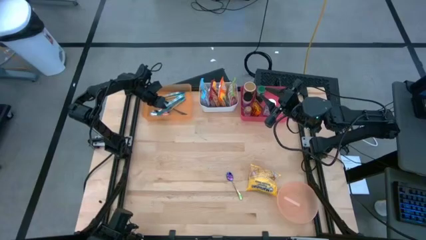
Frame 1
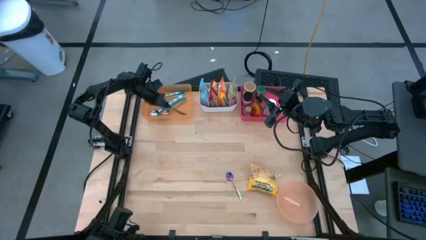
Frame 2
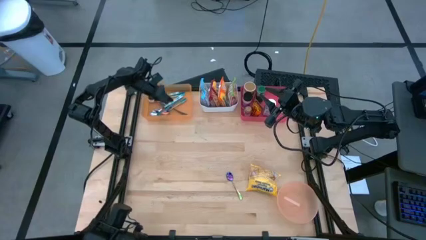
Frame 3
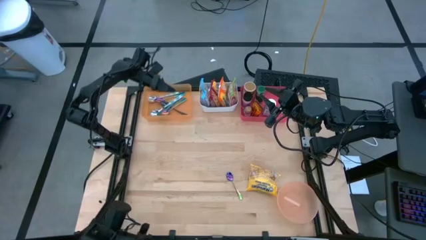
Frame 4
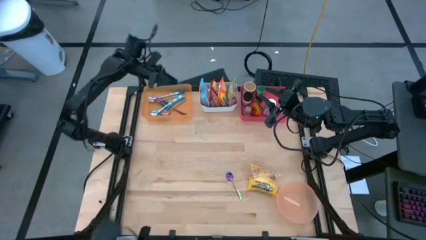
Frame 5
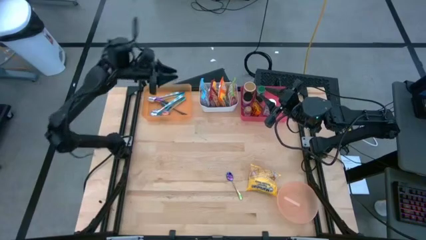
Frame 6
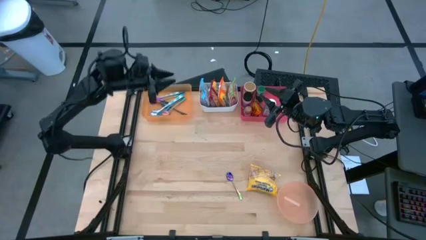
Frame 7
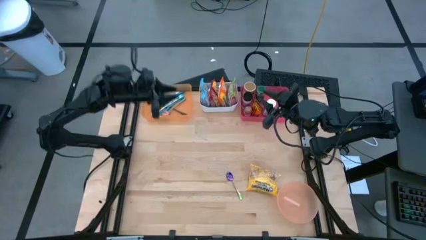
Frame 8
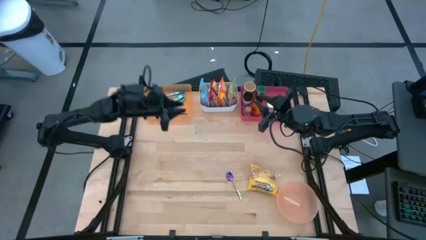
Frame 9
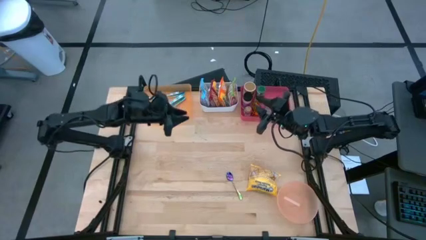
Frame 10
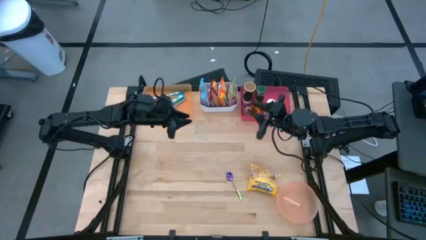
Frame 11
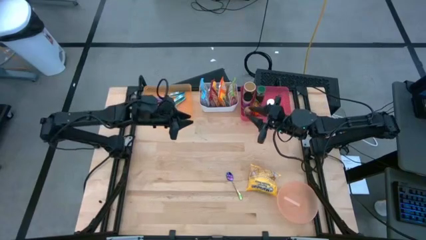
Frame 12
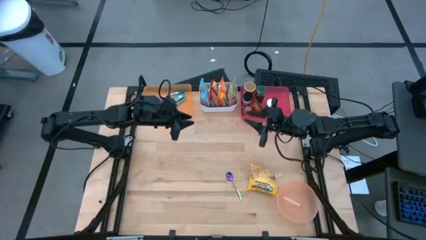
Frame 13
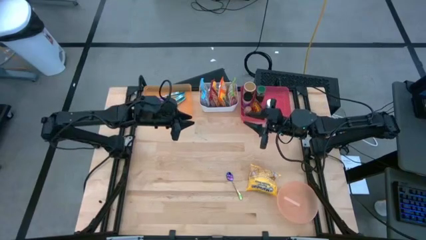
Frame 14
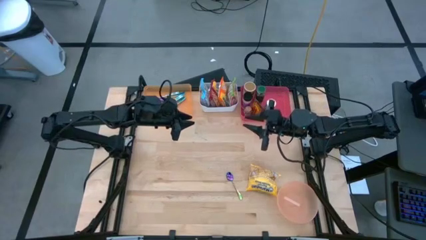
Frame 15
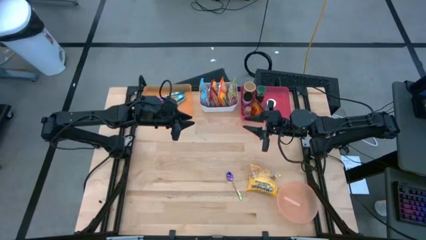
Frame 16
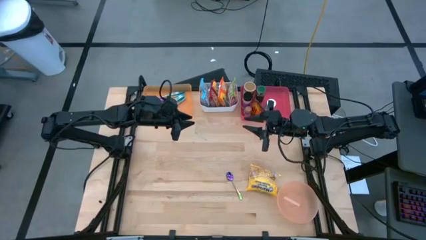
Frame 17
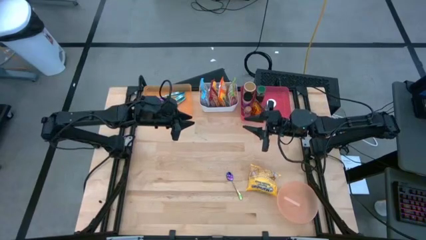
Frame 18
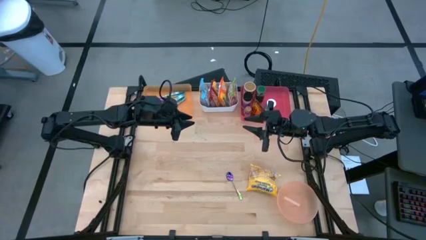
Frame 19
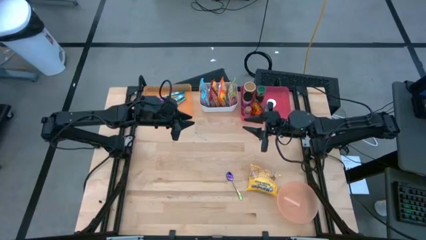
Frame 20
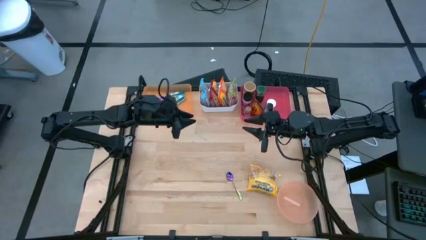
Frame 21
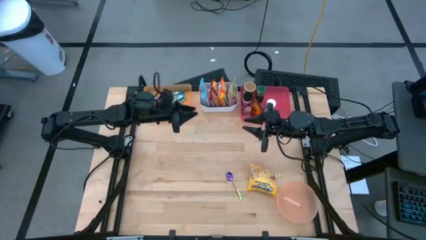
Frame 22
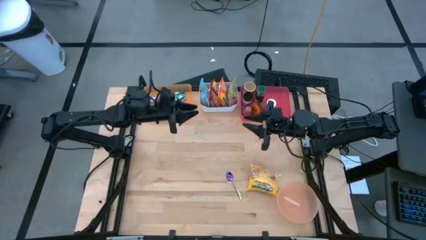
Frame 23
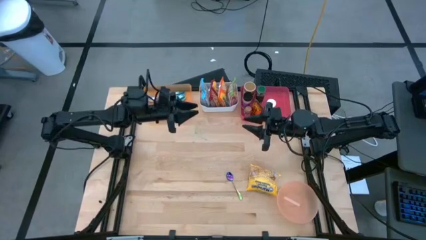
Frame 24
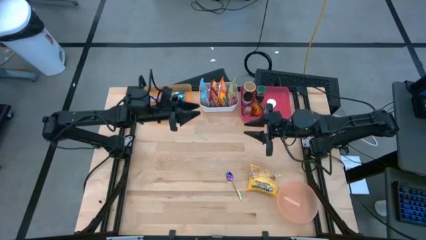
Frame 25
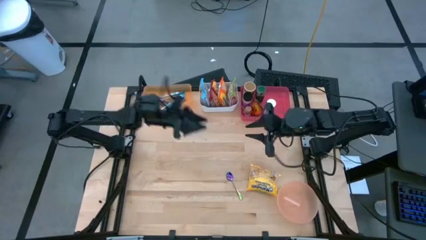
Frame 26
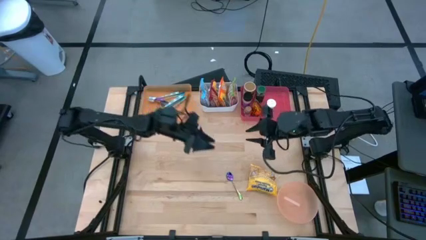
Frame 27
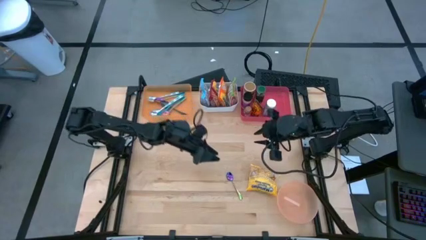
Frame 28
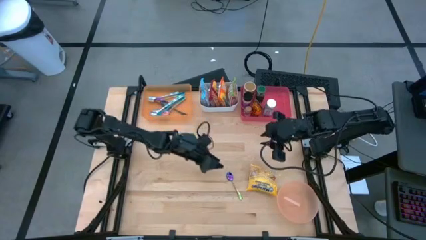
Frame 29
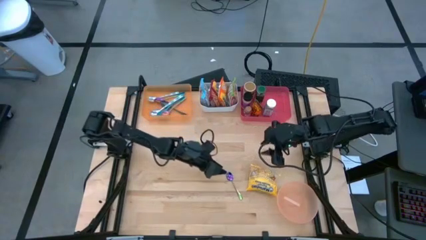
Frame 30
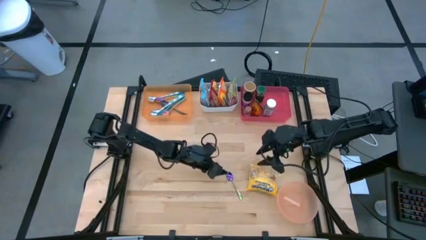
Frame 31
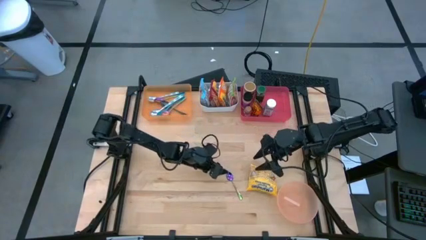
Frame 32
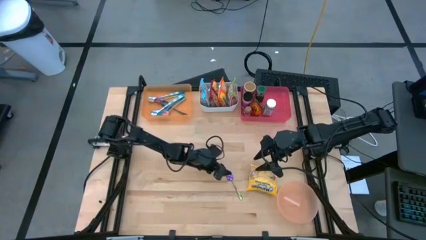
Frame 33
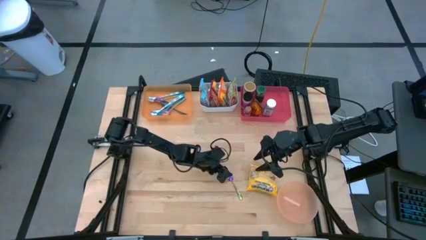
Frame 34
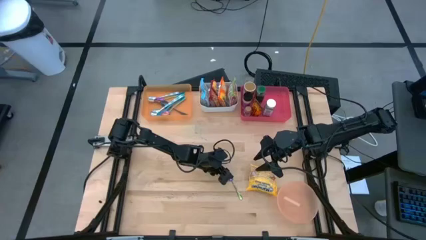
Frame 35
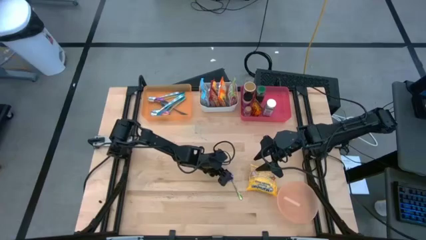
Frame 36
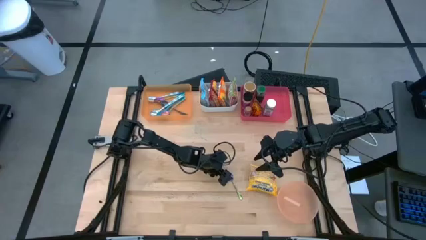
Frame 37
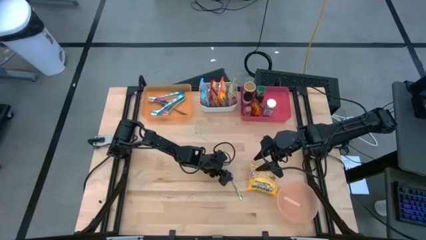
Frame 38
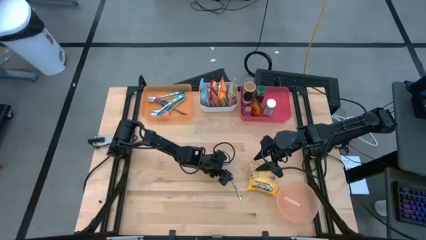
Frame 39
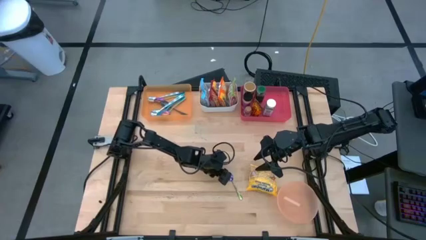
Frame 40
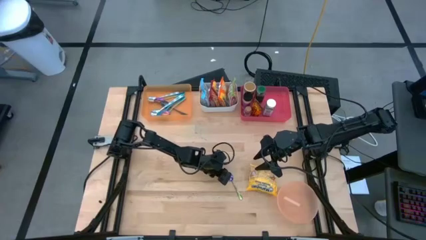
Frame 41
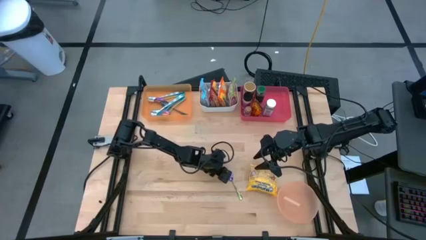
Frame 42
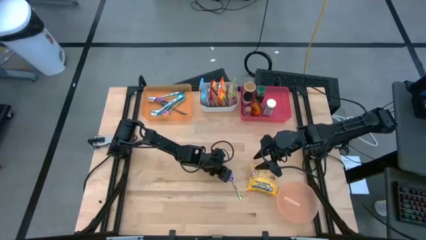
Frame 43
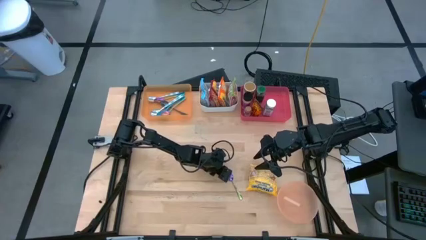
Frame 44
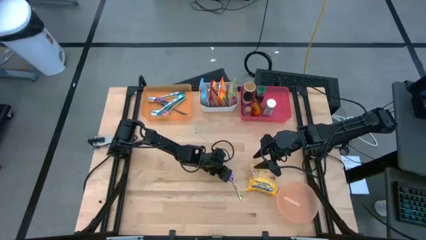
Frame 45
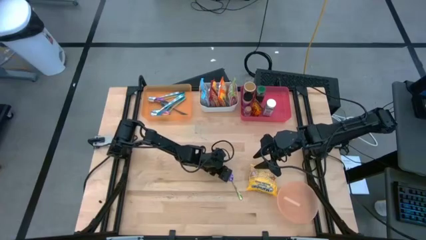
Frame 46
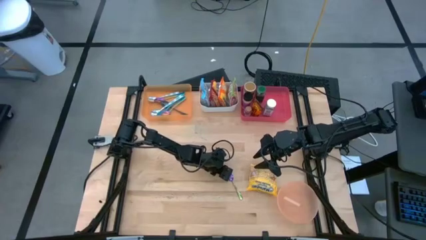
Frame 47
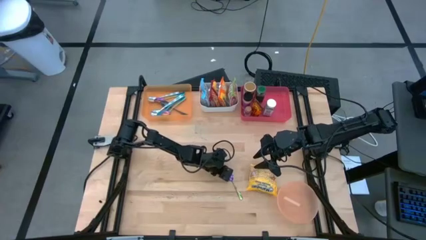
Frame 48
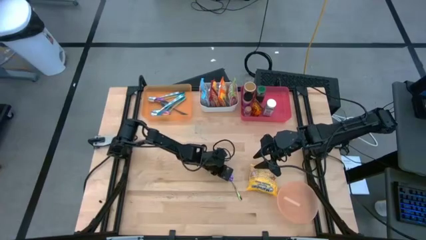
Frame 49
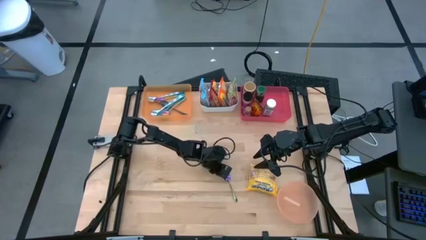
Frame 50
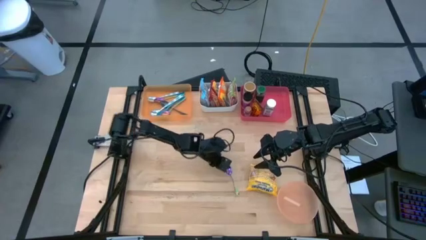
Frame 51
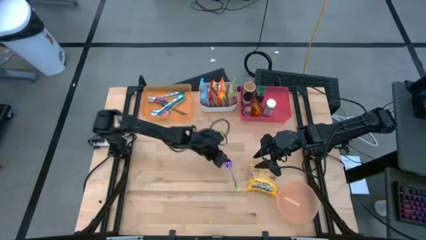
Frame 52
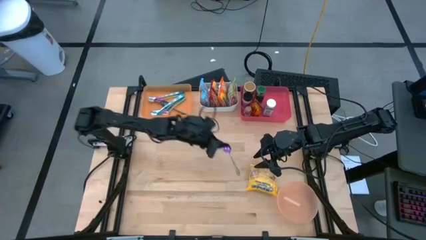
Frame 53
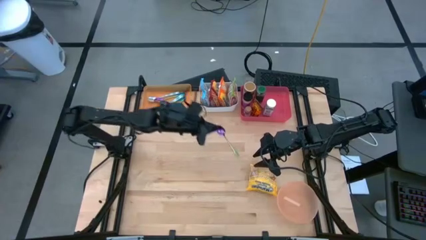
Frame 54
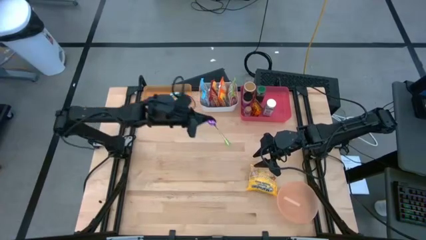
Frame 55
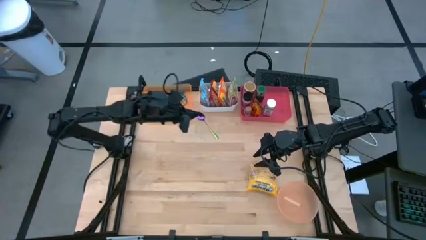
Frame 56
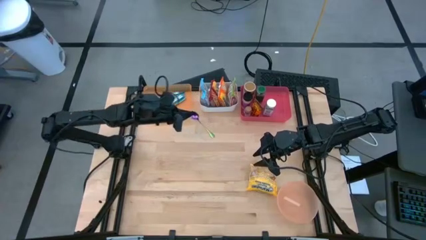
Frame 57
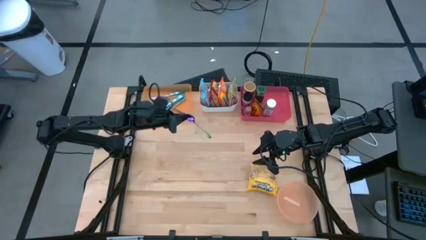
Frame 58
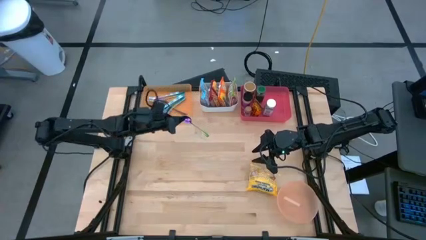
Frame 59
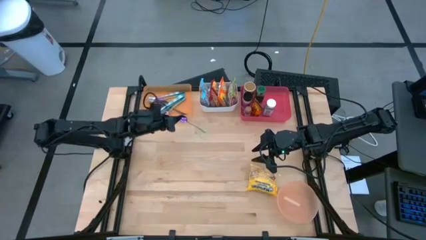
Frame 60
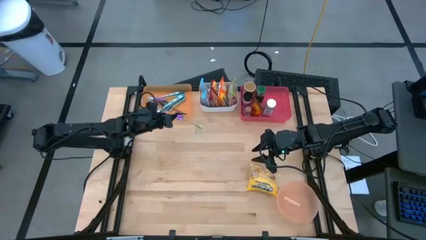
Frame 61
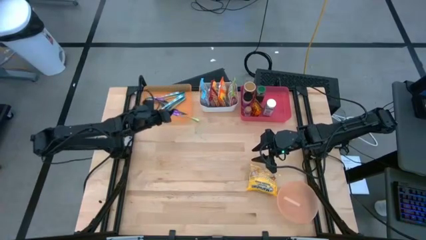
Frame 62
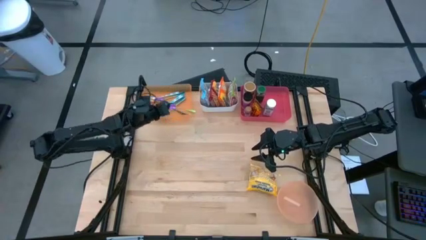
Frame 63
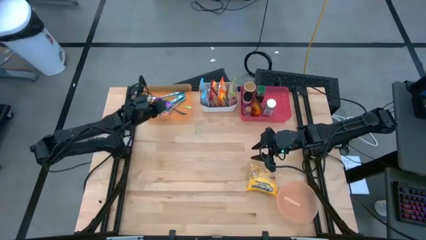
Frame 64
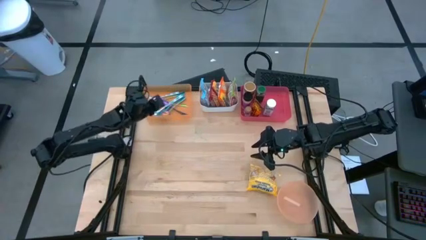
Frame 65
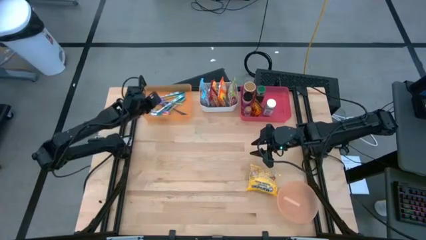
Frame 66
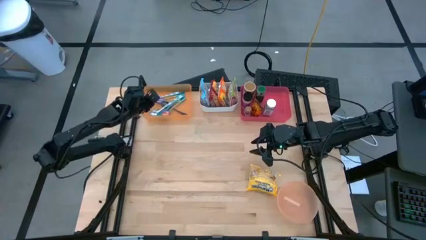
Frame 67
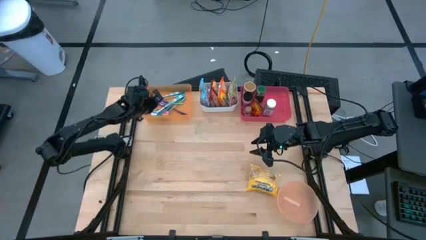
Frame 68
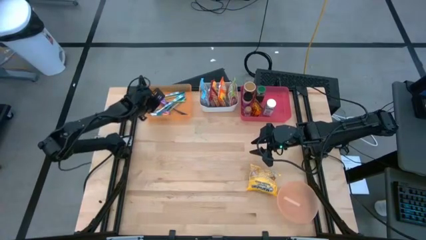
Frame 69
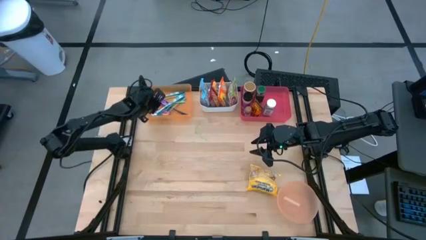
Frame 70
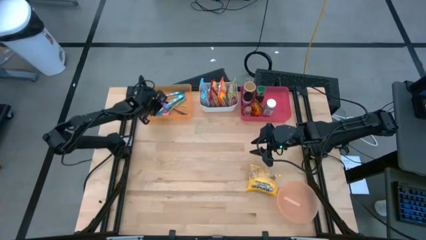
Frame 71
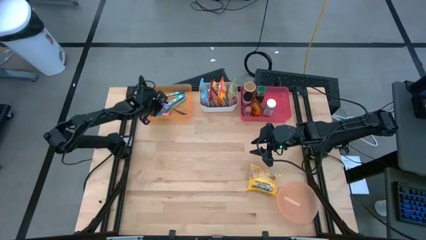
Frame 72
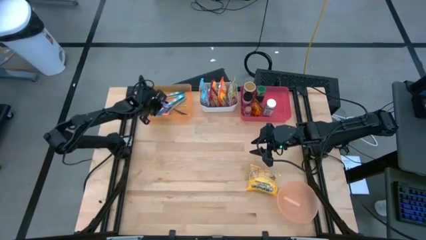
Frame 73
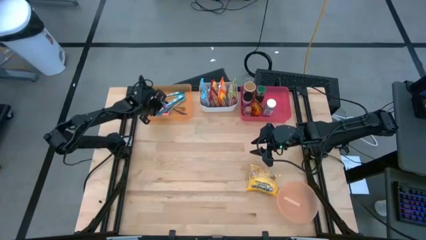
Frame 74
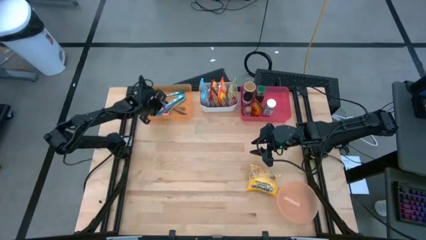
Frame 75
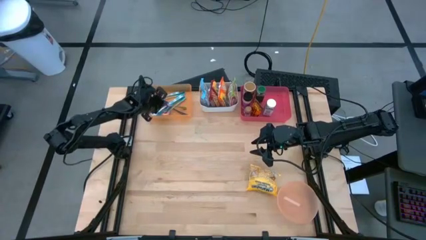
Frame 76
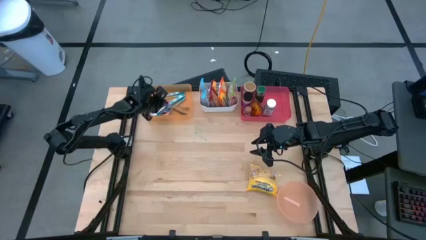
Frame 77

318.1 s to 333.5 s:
Task: Pick & Place Food Item
Put the violet and green spoon into the orange bin
